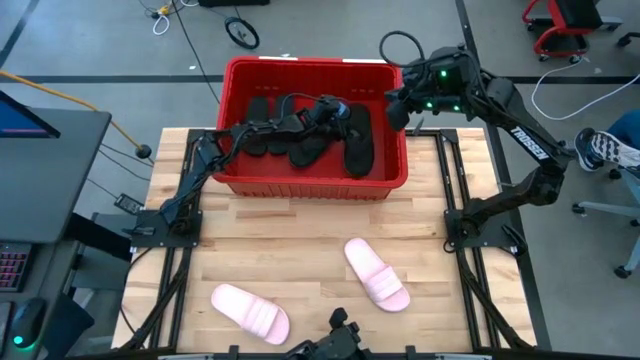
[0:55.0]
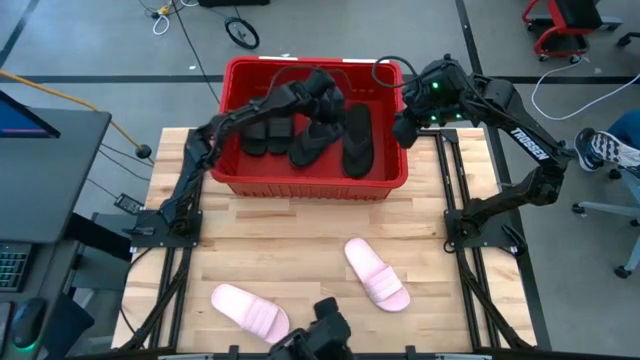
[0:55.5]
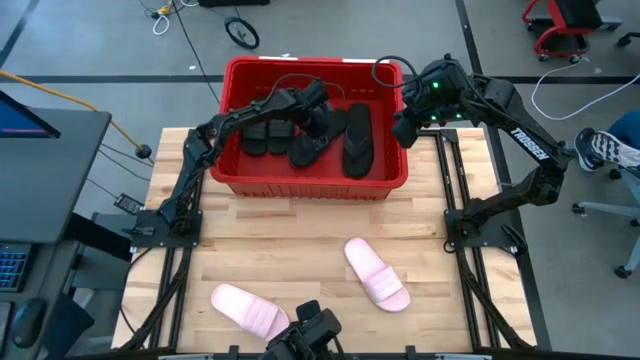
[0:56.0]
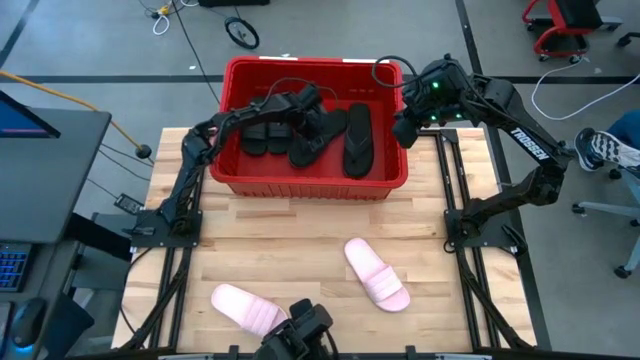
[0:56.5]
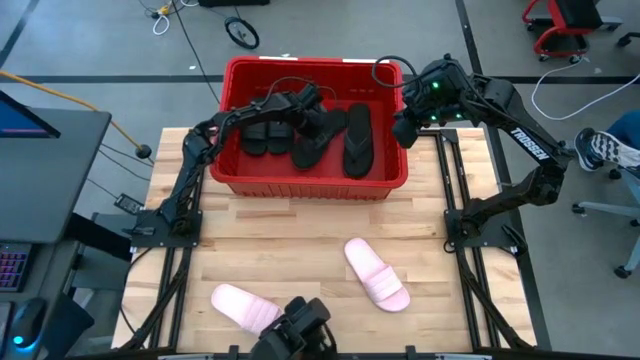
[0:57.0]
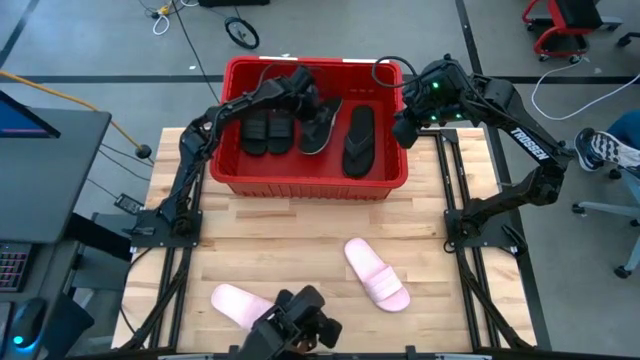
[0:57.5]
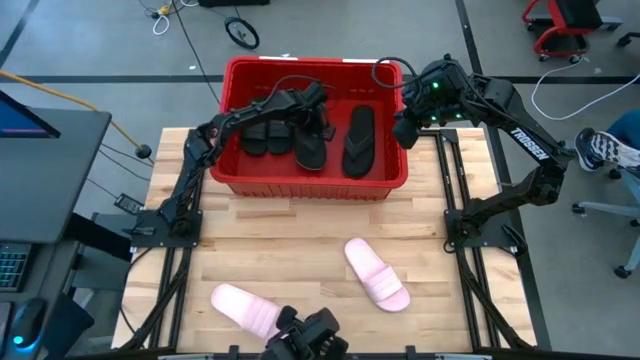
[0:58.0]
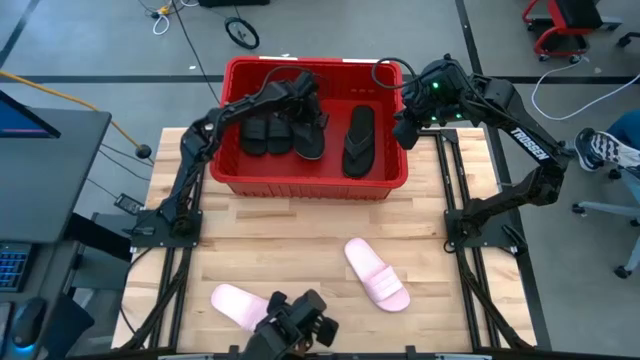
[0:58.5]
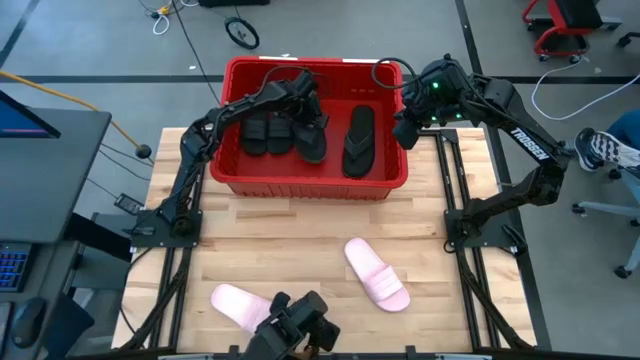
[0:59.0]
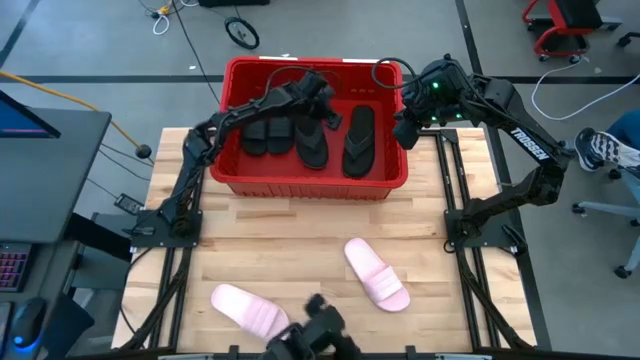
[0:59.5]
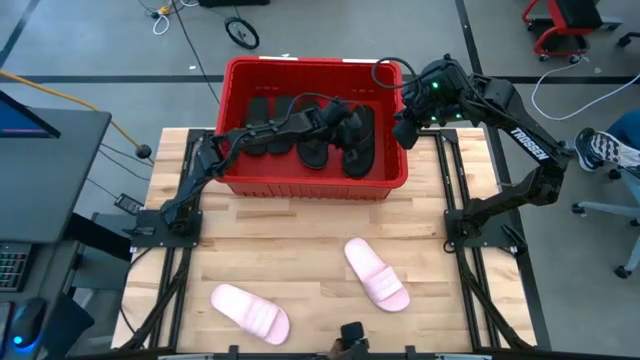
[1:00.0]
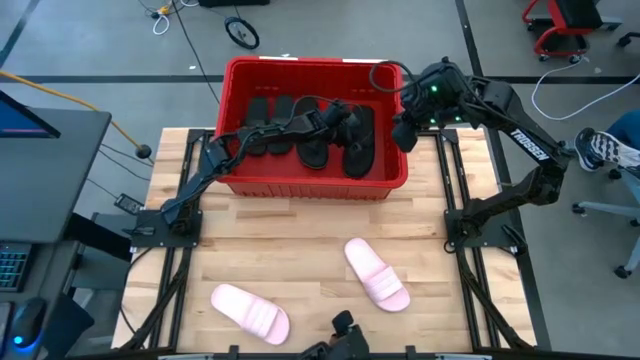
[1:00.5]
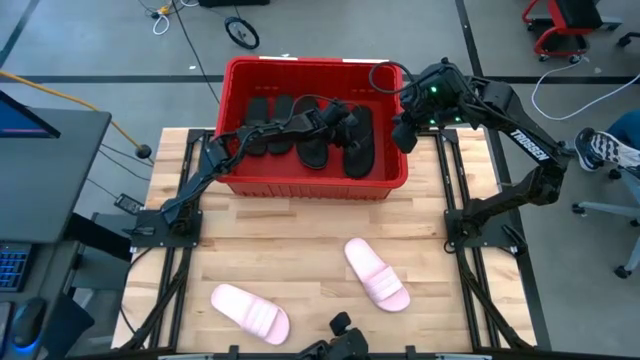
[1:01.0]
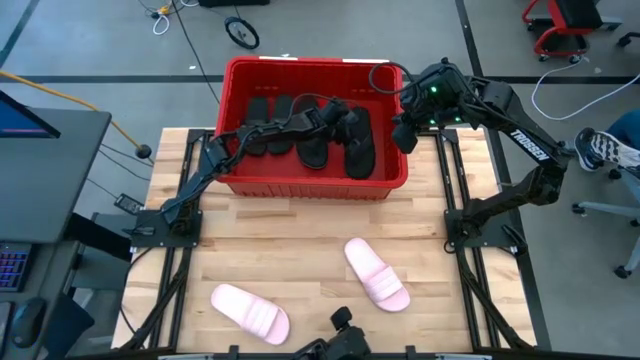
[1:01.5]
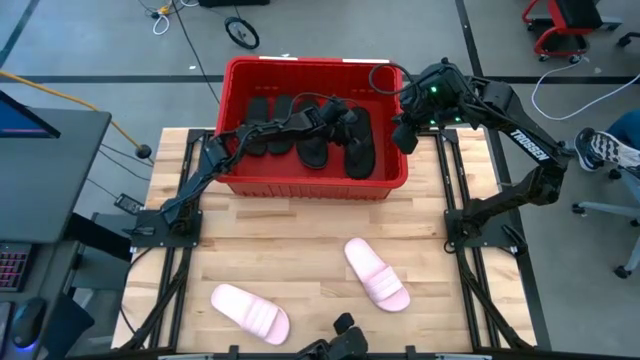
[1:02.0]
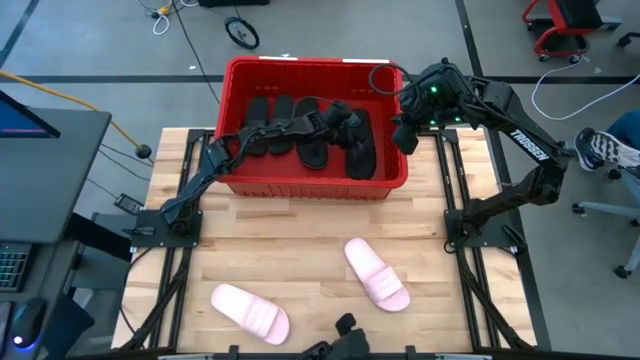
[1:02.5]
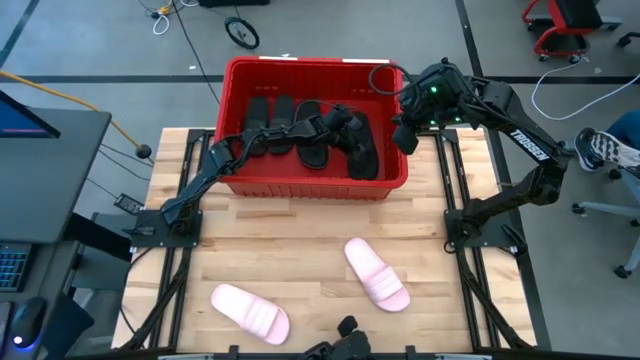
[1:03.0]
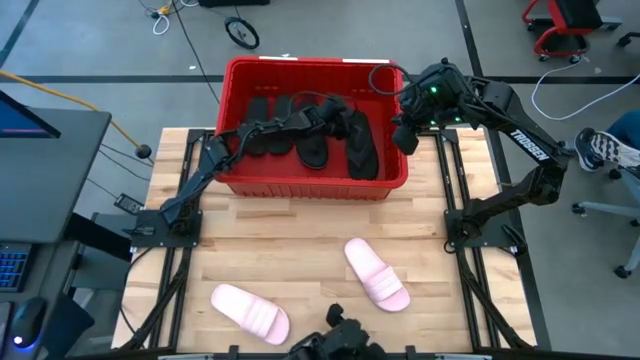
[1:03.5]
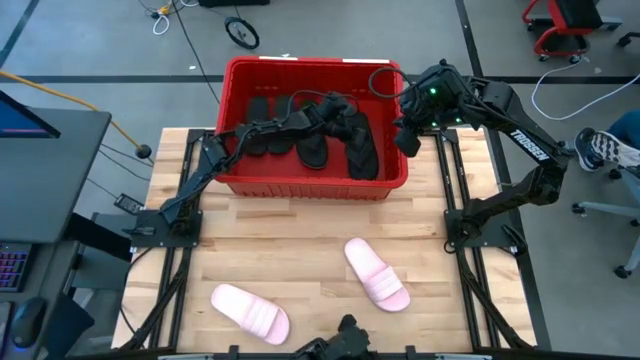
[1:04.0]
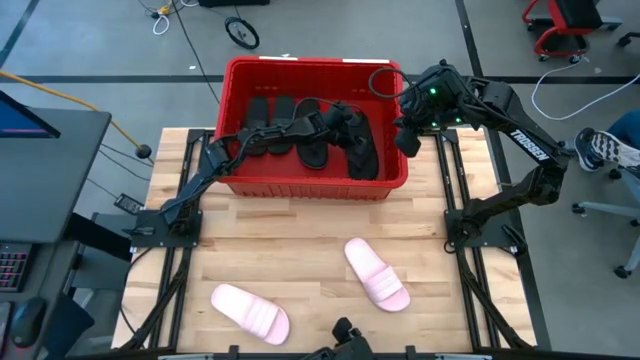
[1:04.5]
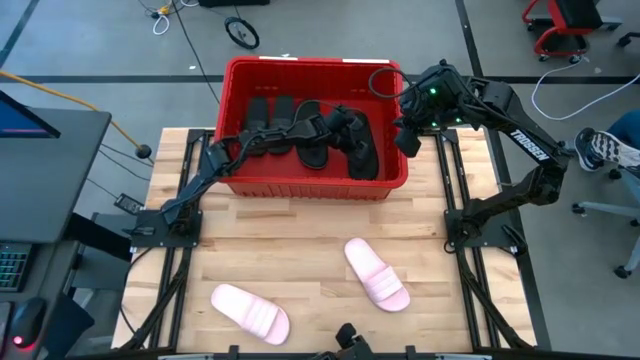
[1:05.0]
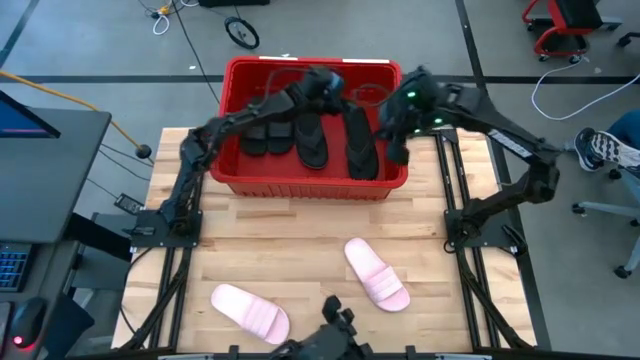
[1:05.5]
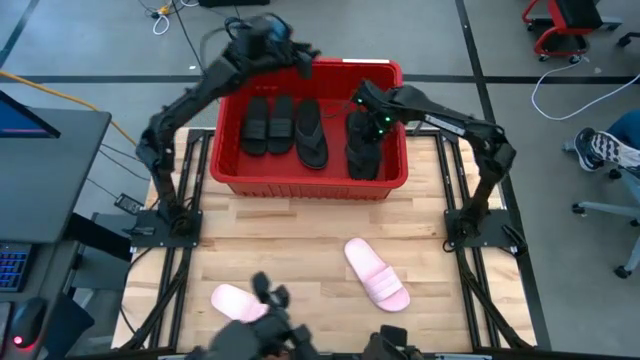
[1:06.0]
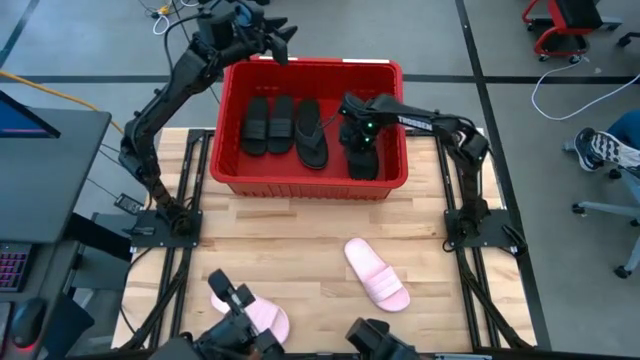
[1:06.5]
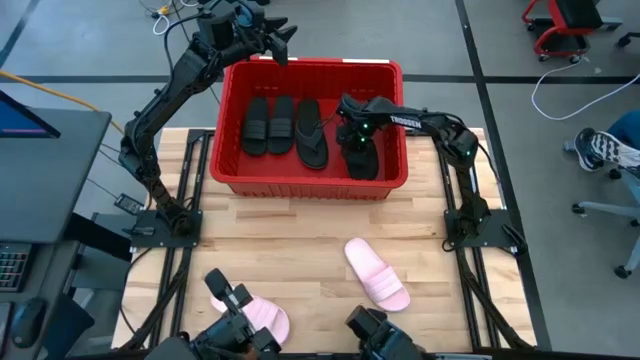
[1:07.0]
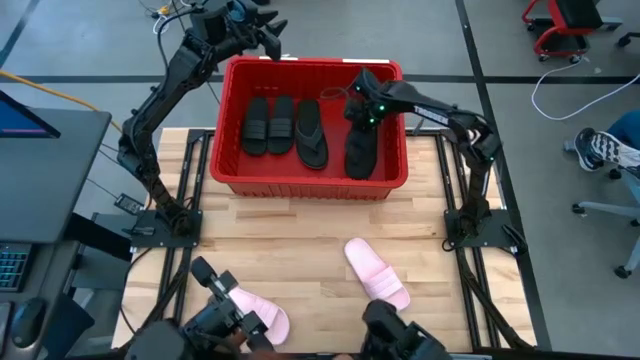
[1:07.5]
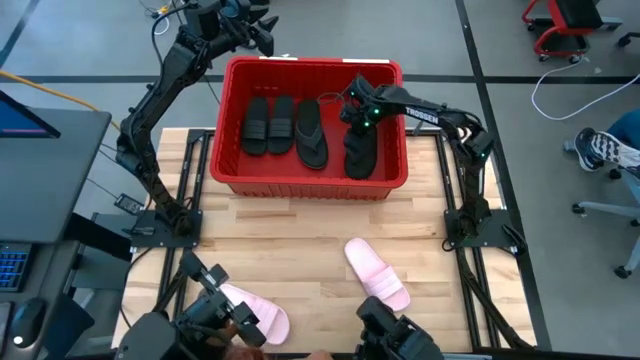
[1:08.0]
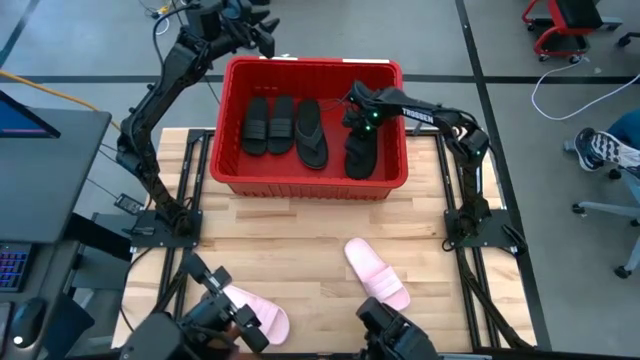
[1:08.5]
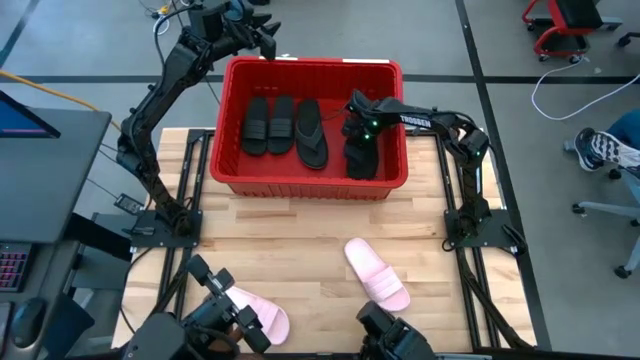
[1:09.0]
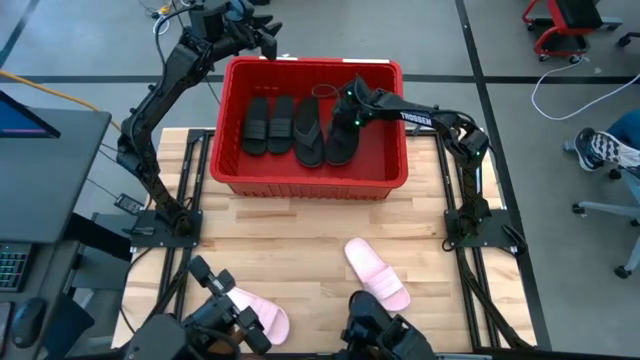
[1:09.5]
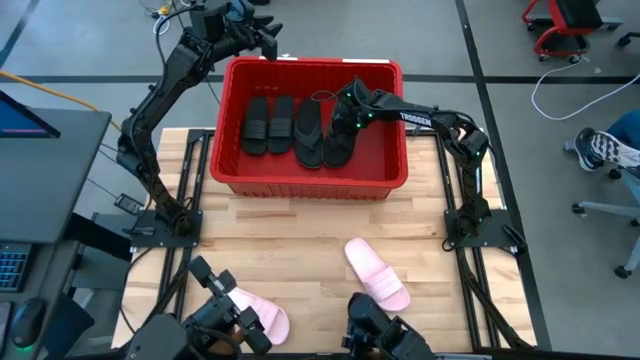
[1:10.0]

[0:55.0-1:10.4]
Task: Pick and place slides into bin
Adjust the slippers and slides in the red container

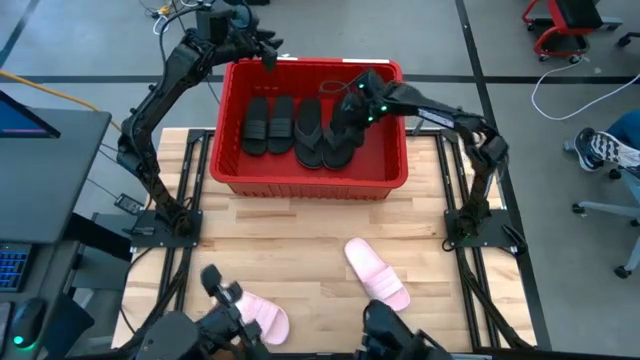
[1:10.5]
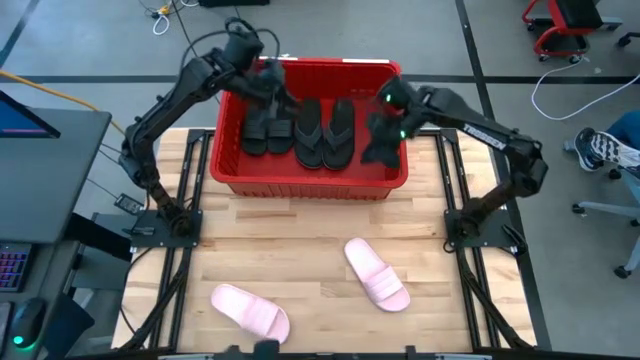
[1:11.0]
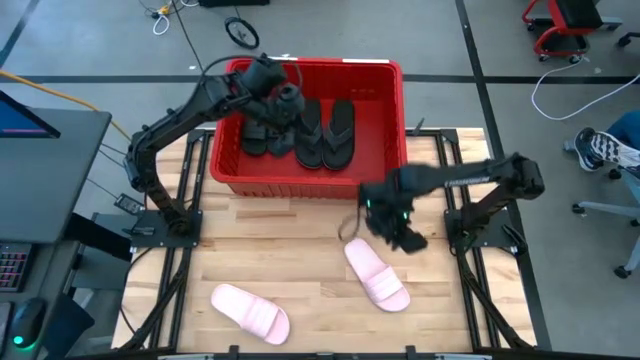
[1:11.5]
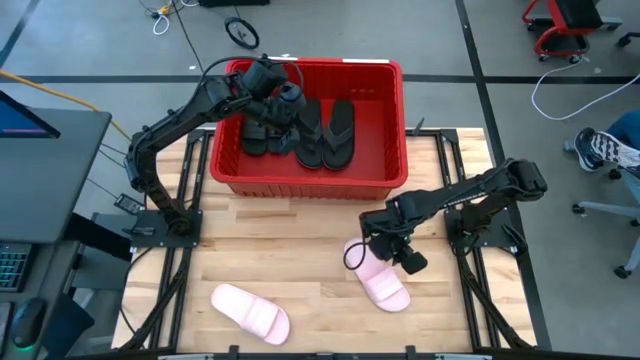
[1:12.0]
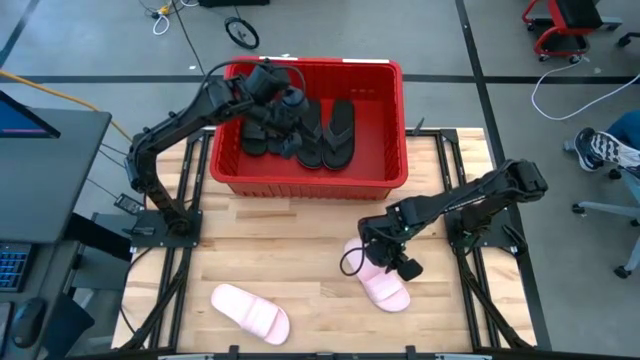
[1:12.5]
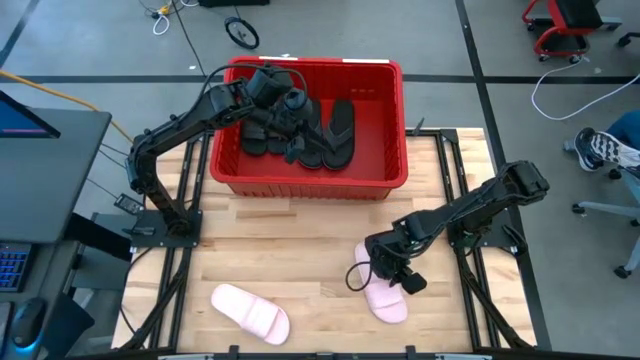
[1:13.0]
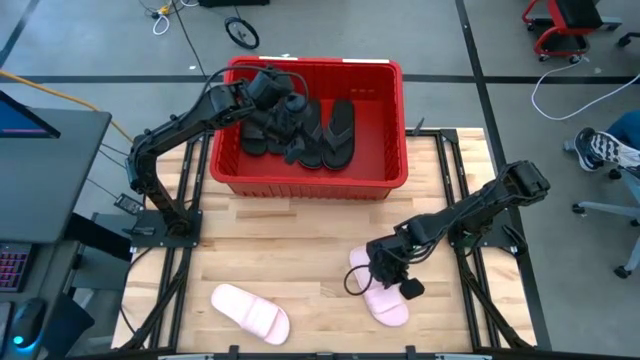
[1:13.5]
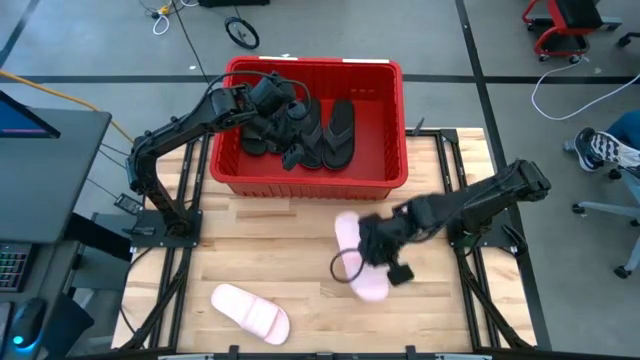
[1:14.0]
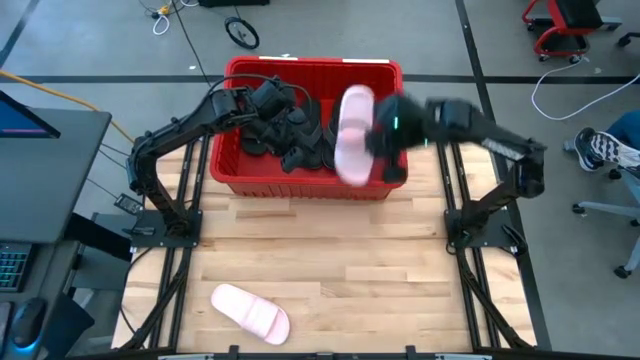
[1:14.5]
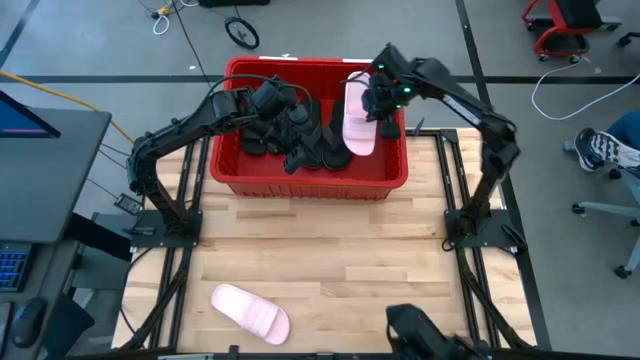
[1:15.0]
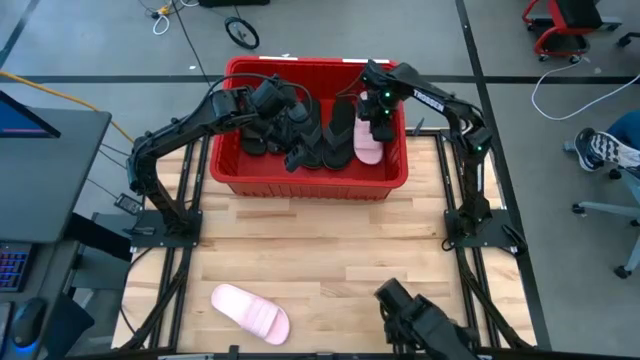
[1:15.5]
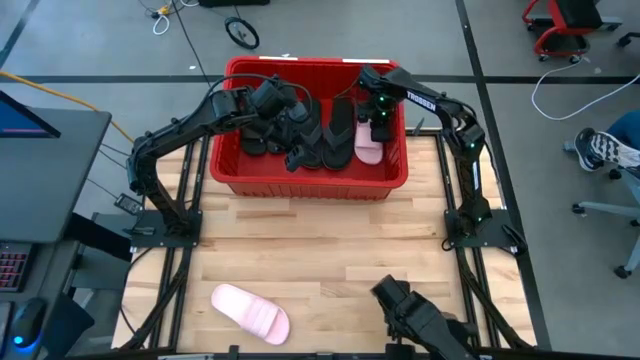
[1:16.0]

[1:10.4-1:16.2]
Put the right pink slide into the red container
